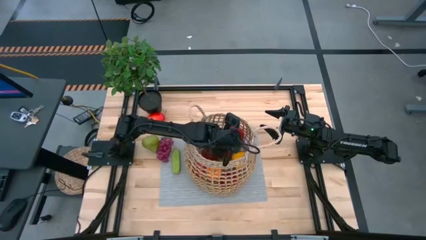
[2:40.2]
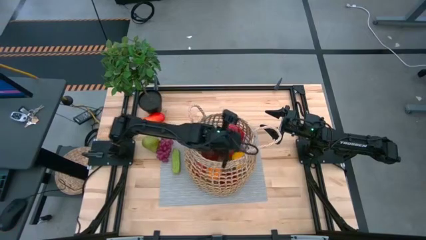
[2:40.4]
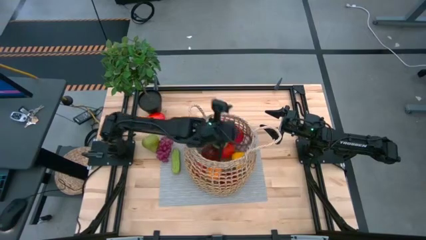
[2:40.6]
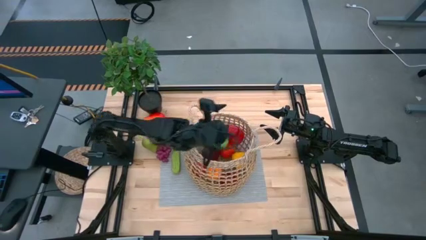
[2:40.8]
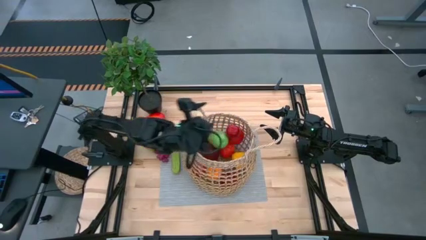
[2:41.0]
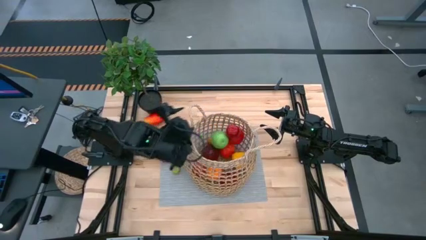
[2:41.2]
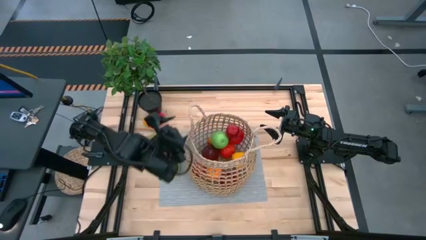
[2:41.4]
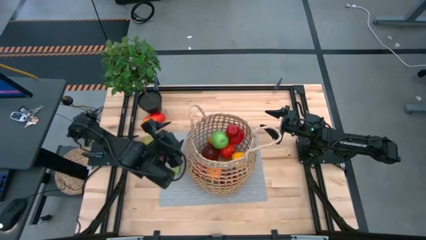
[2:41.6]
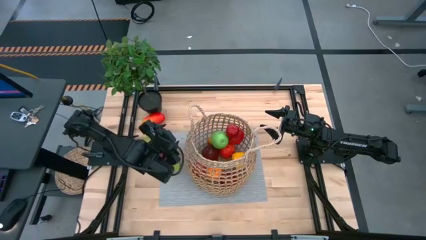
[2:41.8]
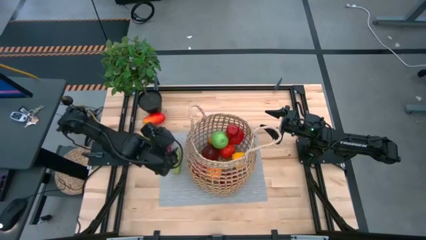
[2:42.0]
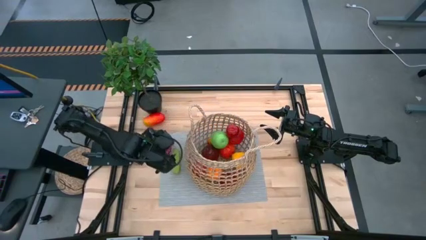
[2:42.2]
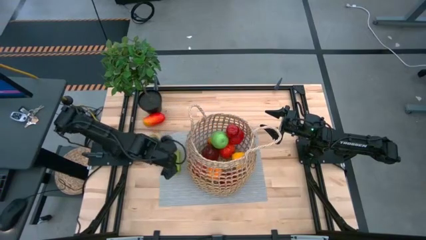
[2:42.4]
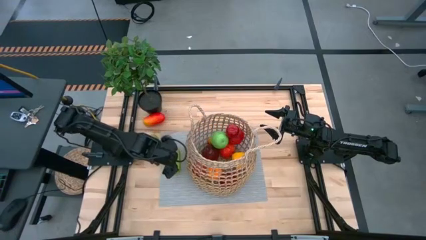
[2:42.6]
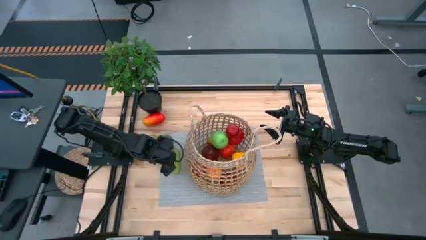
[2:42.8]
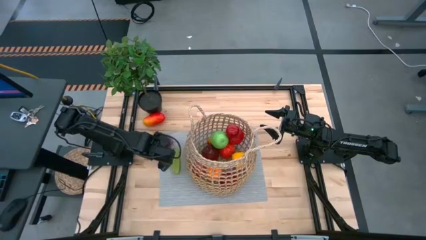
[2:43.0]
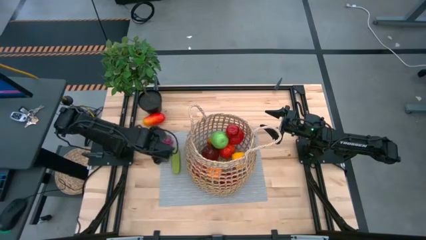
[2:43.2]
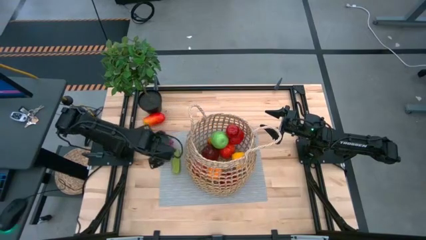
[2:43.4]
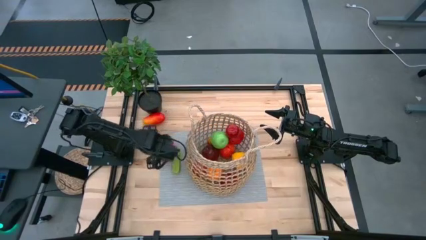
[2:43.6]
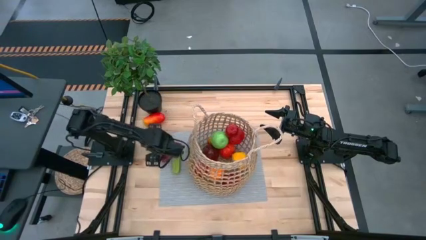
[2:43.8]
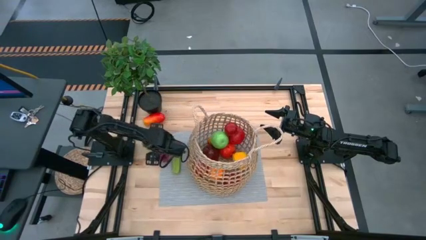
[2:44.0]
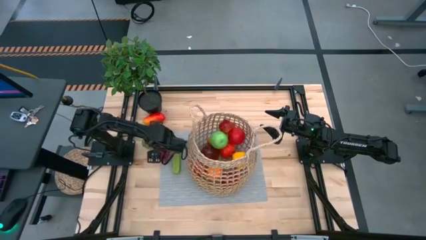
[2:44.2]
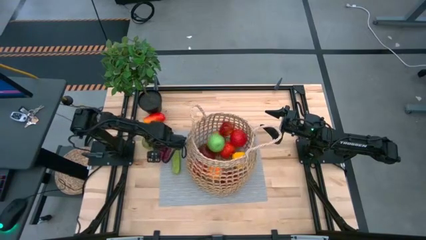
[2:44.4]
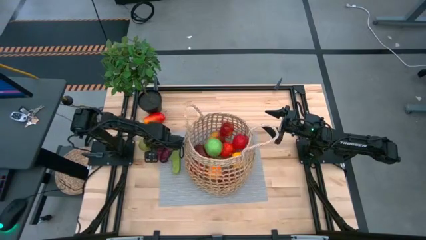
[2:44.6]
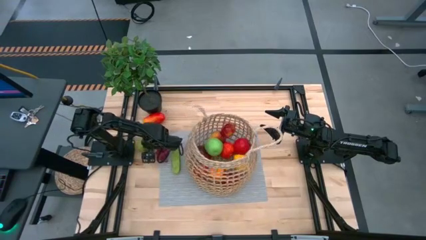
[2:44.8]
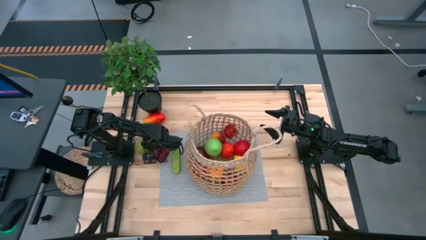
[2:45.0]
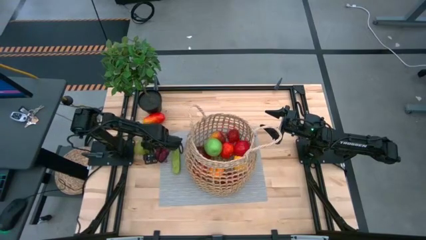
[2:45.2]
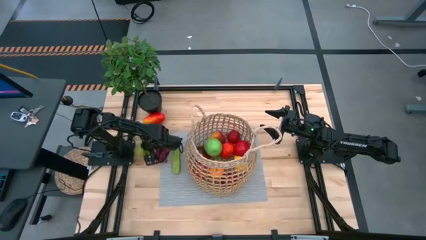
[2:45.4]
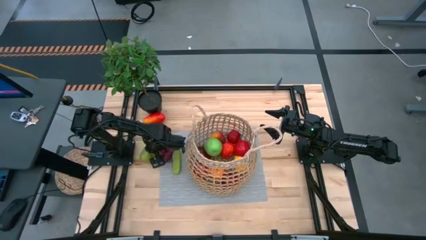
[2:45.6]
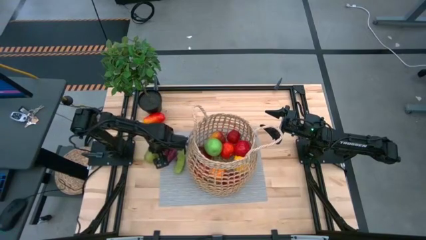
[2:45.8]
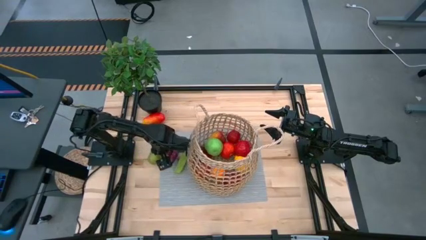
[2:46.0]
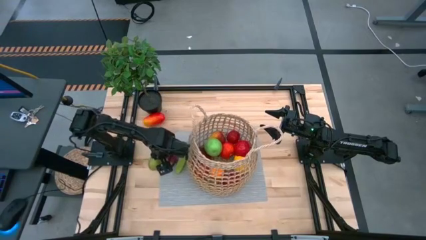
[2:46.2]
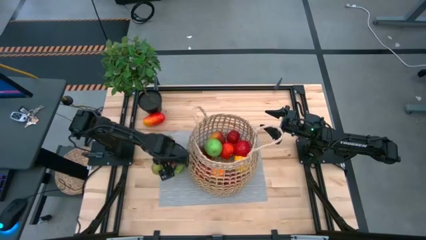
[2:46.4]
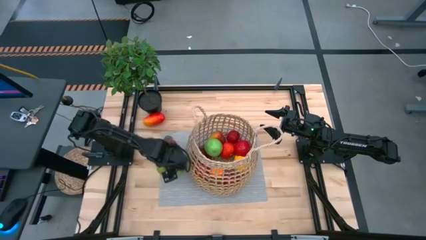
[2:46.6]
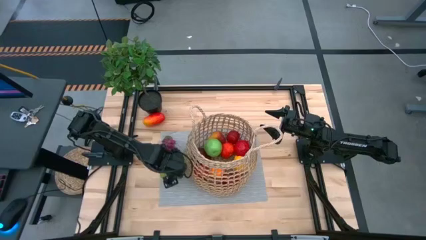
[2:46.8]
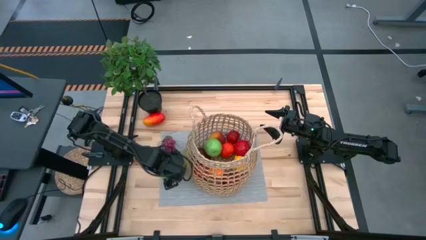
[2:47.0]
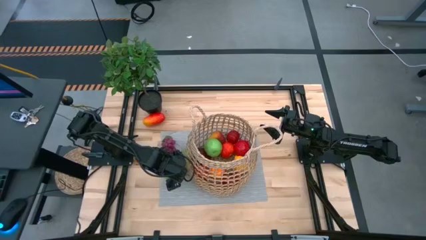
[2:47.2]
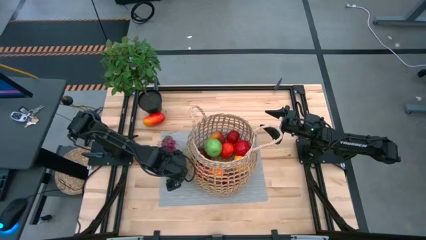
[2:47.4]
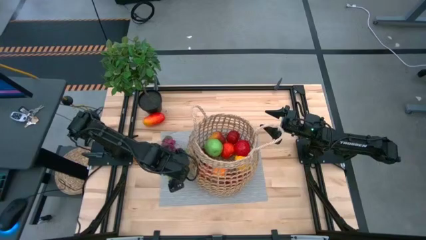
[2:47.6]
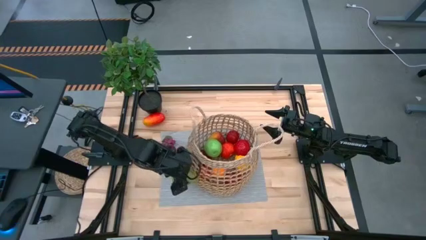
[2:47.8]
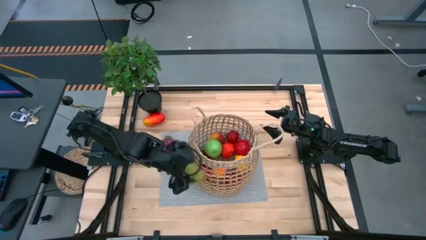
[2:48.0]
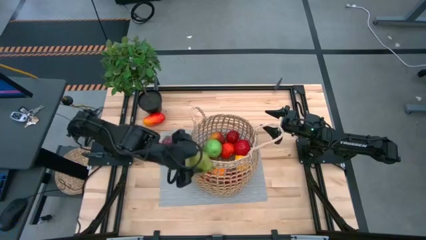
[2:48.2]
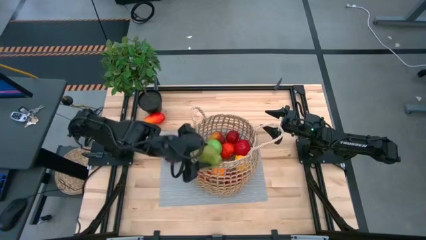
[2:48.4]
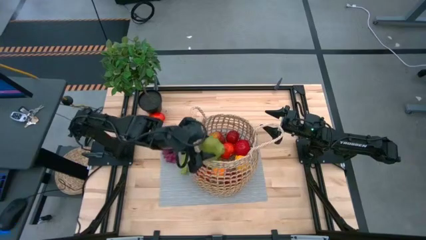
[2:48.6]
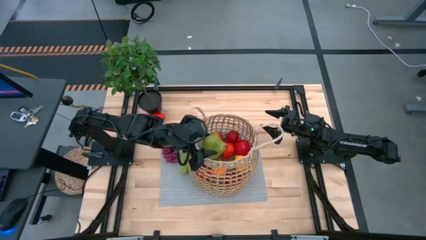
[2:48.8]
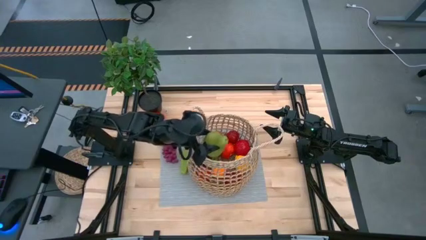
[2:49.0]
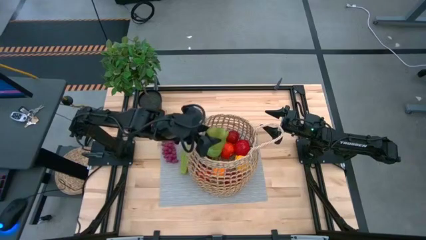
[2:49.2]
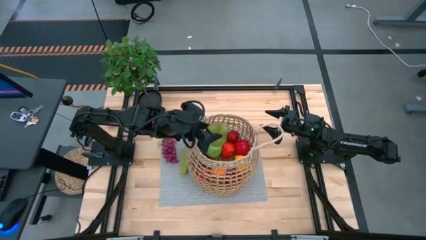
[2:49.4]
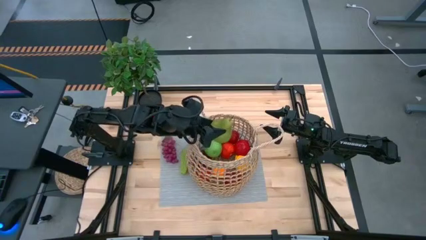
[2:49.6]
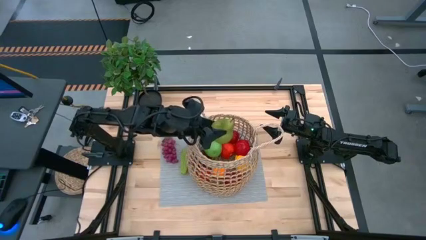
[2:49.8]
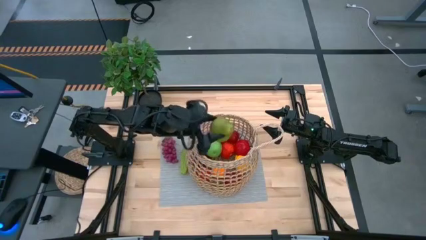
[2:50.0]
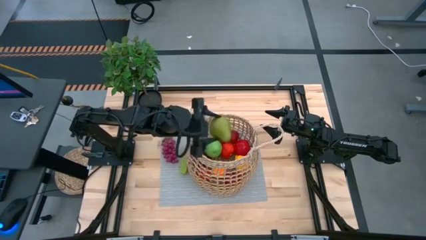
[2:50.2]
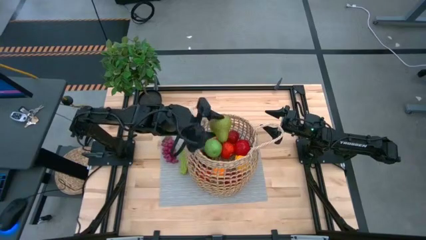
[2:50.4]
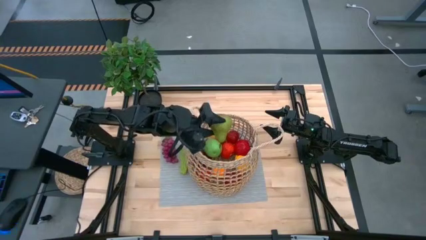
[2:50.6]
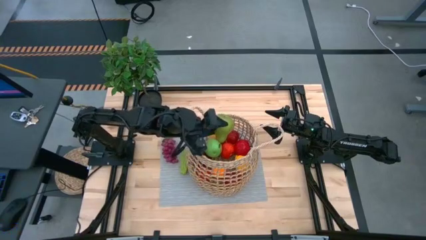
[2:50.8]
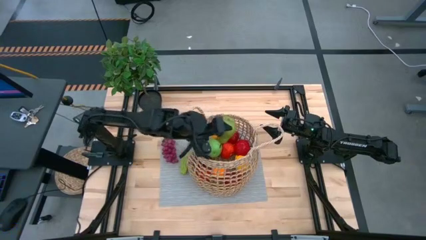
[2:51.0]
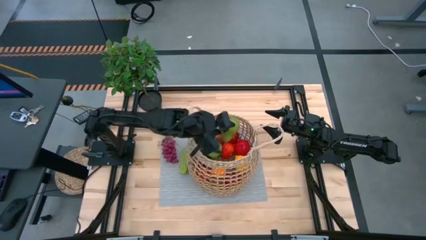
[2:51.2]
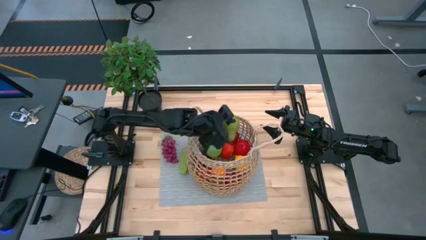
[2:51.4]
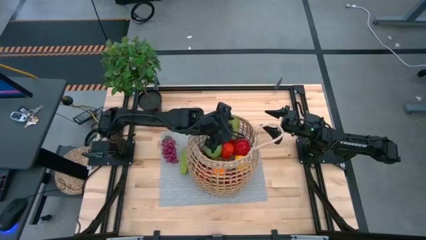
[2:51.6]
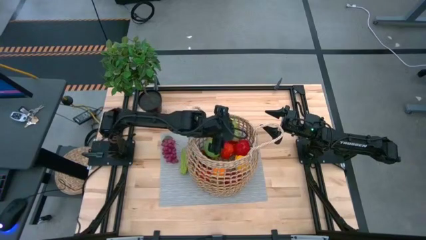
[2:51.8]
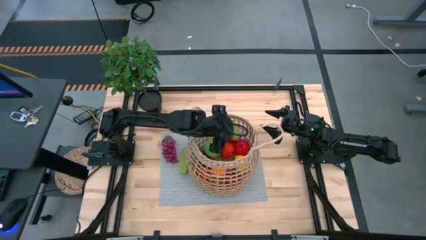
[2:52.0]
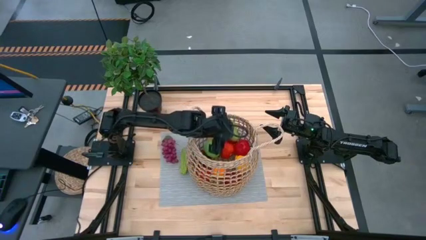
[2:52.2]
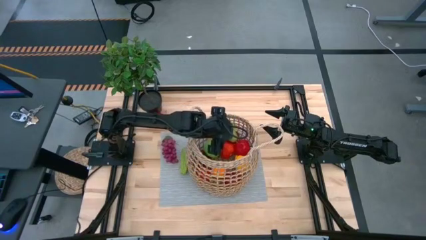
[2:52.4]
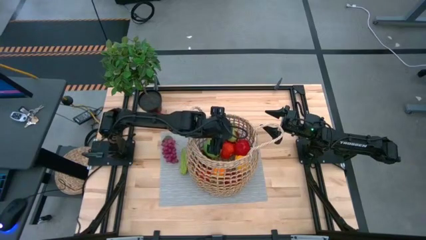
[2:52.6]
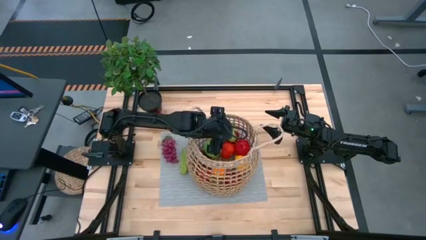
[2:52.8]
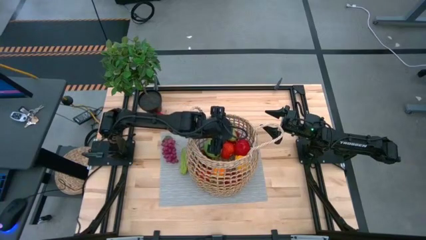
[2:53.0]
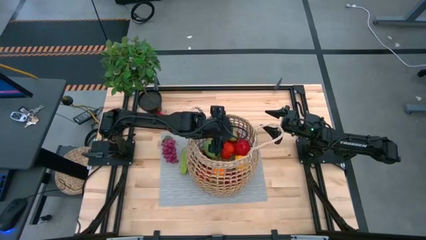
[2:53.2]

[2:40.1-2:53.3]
Task: Build produce basket
Put the green pear into the brown basket

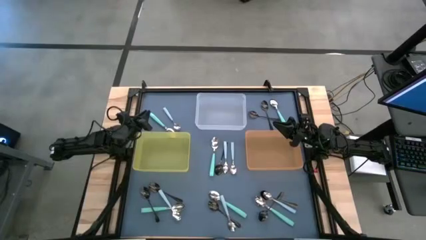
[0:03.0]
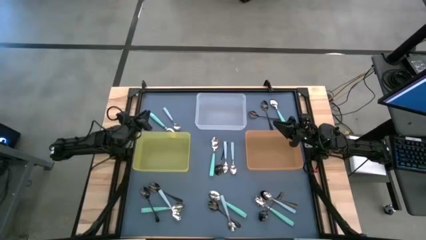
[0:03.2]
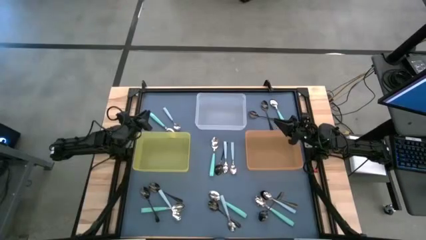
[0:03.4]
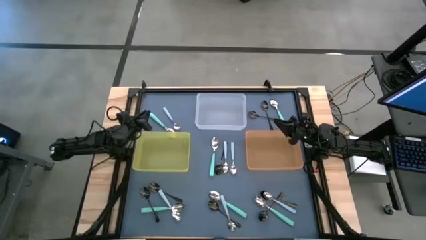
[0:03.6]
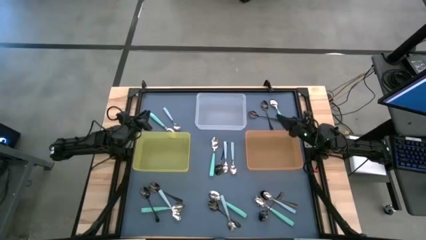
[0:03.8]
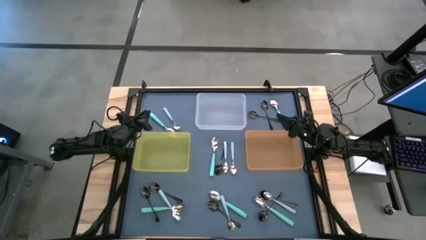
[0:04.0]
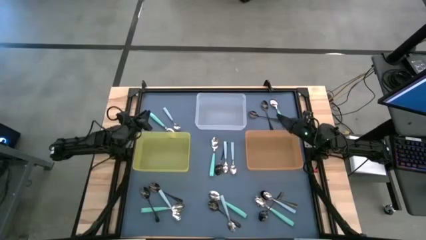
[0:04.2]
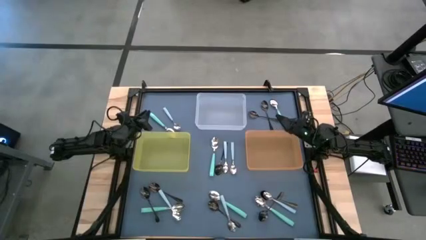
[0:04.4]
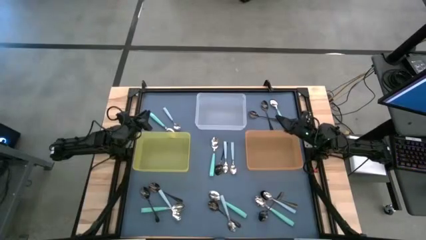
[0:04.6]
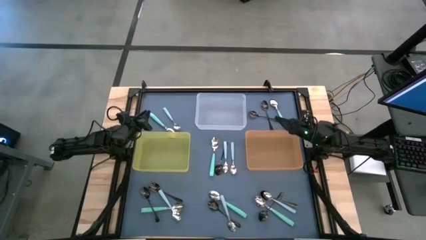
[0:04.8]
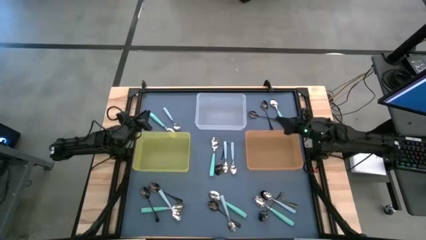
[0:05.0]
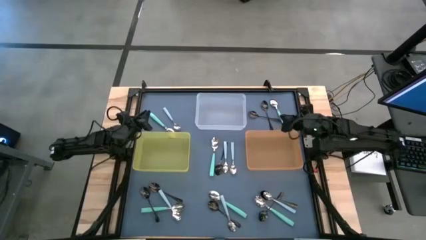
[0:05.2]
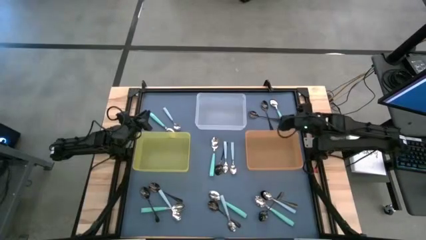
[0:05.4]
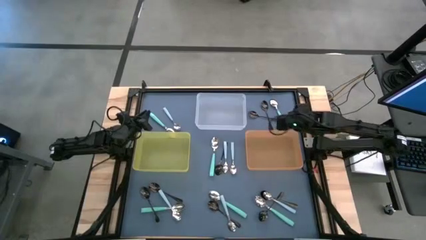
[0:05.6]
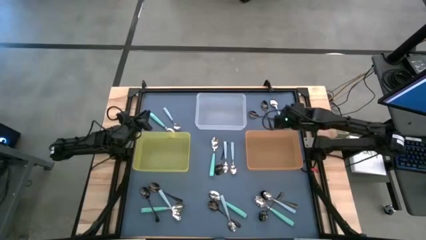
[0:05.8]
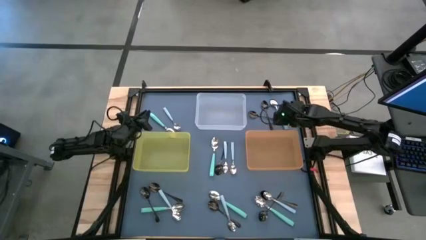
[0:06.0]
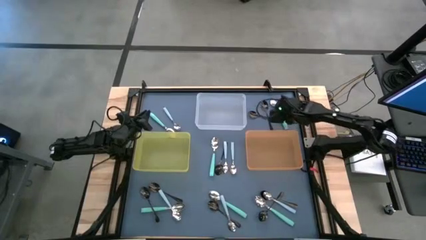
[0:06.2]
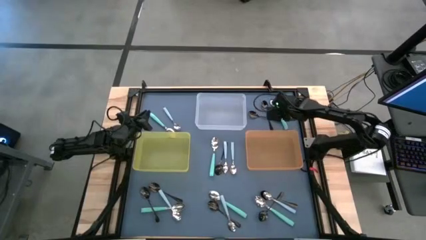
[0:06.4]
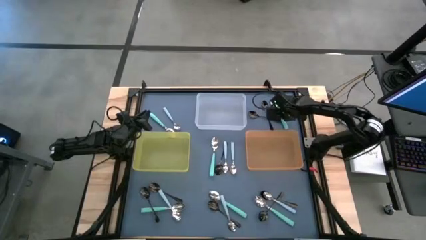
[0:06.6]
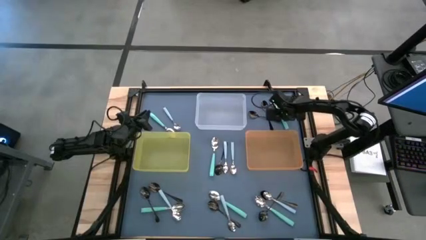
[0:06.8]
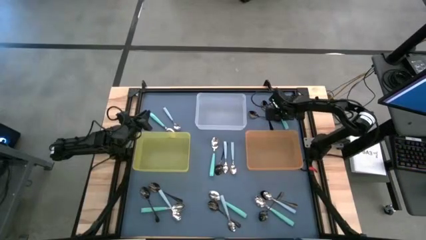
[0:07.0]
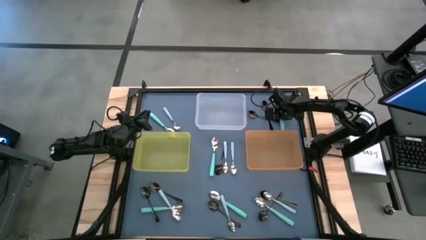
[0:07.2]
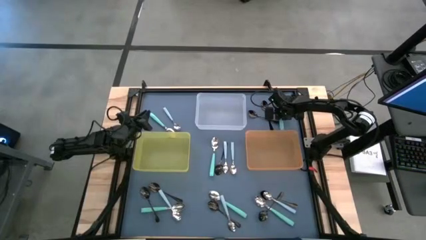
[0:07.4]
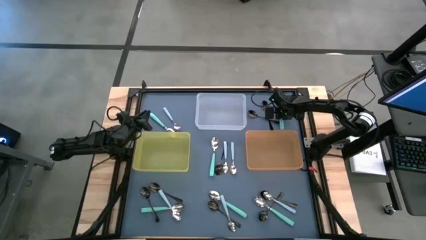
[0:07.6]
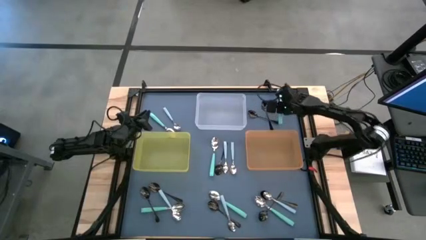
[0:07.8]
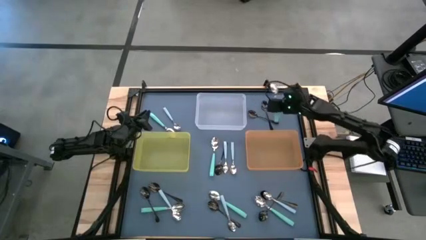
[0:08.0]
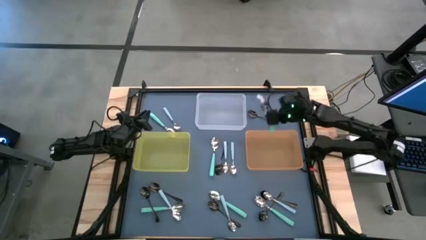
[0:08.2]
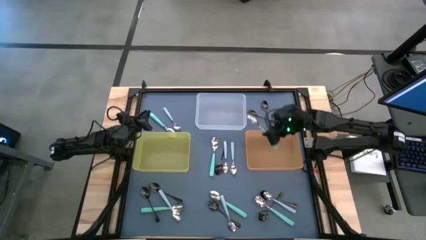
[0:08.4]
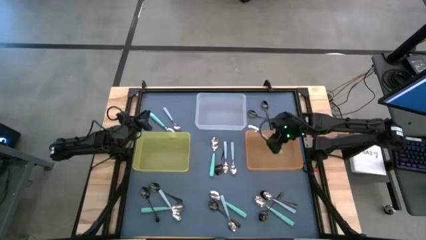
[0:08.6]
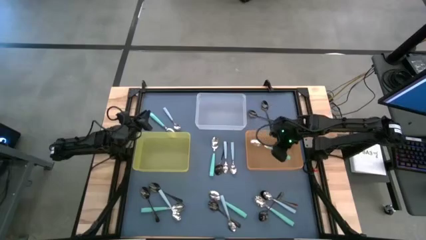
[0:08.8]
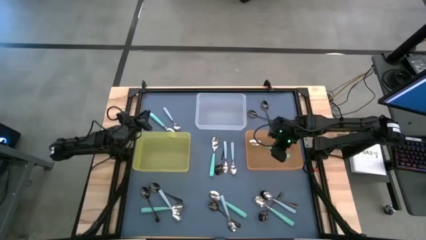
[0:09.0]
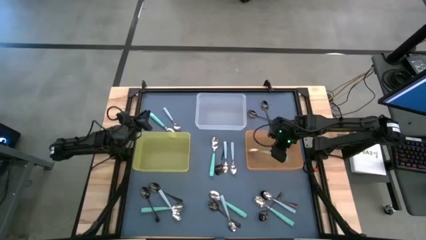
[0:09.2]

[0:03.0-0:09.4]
Task: Sort silverware by color (type)
Put the green spoon into the orange bin
